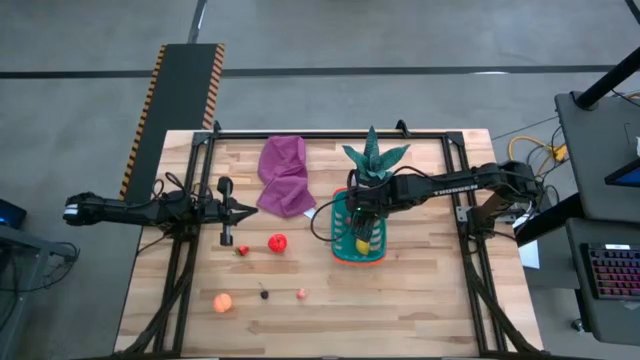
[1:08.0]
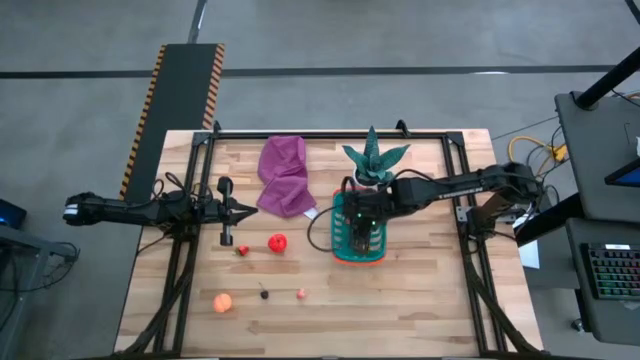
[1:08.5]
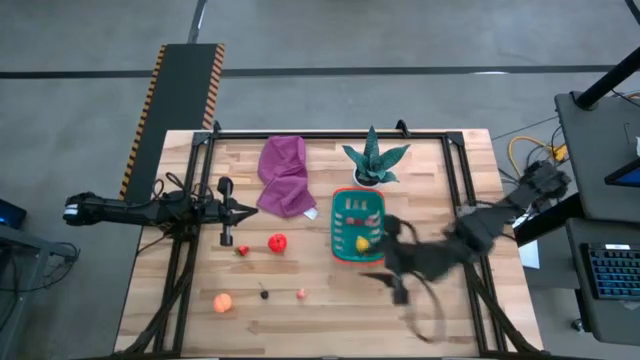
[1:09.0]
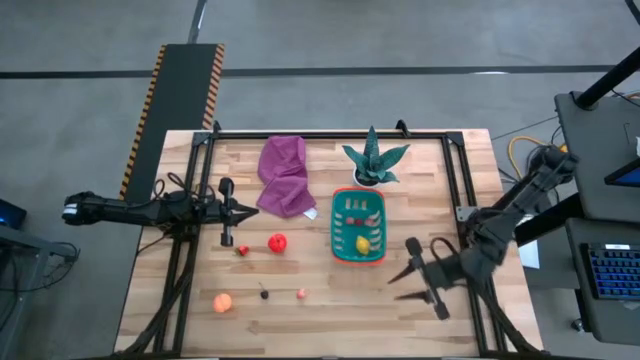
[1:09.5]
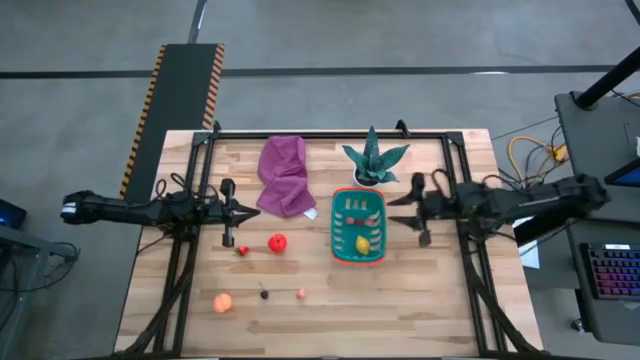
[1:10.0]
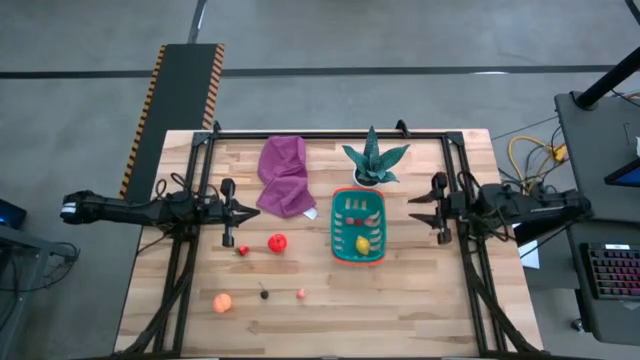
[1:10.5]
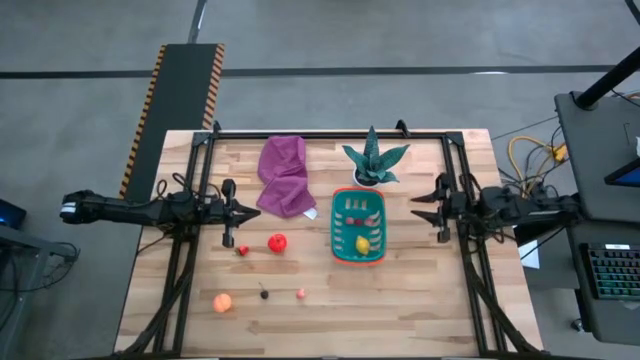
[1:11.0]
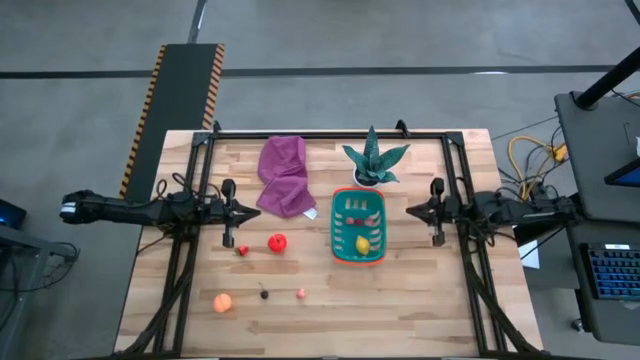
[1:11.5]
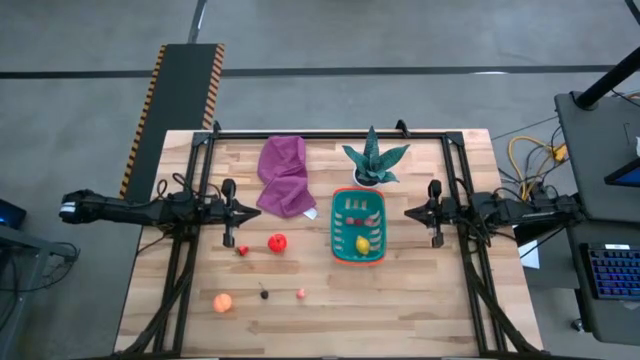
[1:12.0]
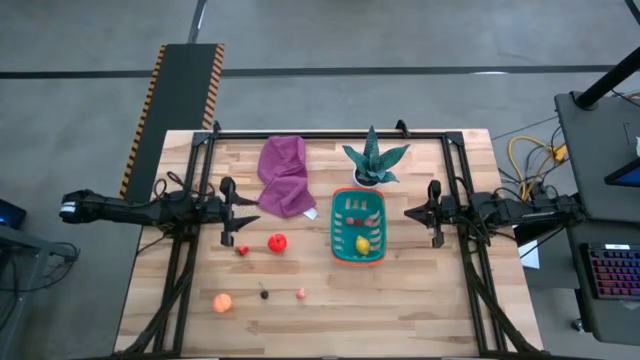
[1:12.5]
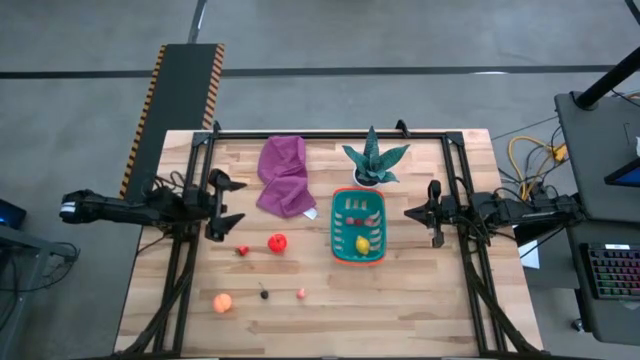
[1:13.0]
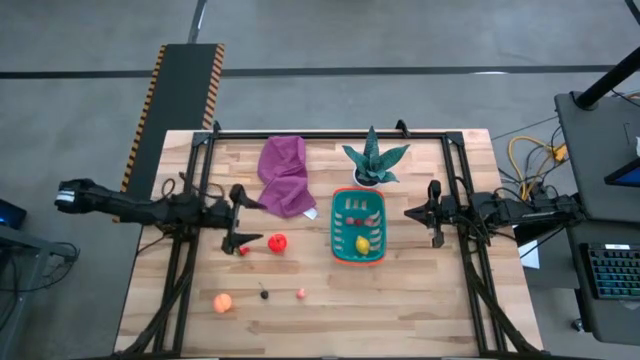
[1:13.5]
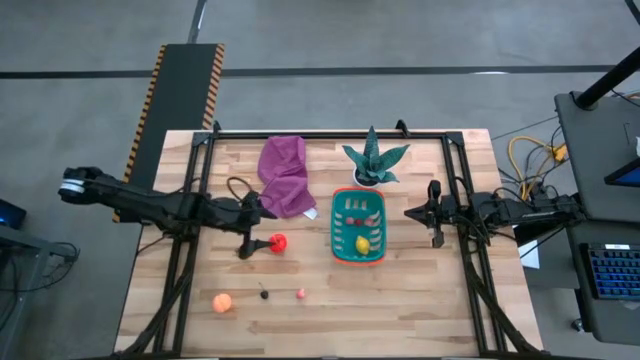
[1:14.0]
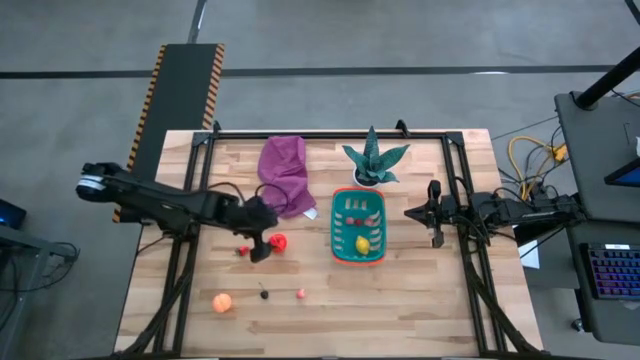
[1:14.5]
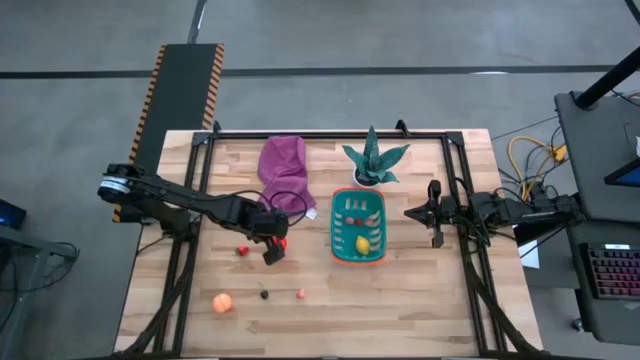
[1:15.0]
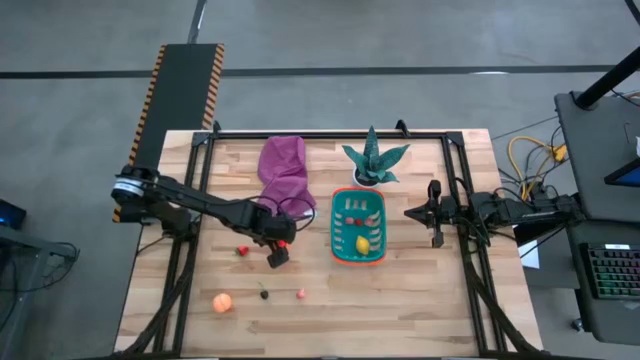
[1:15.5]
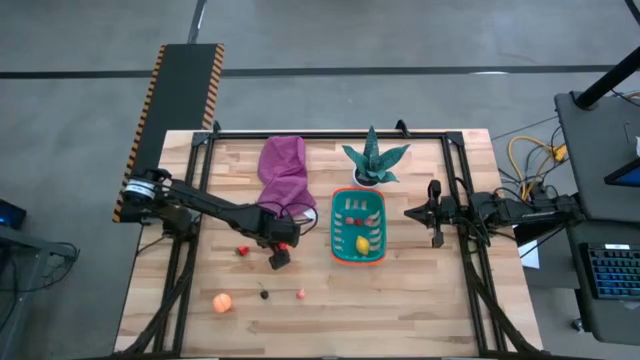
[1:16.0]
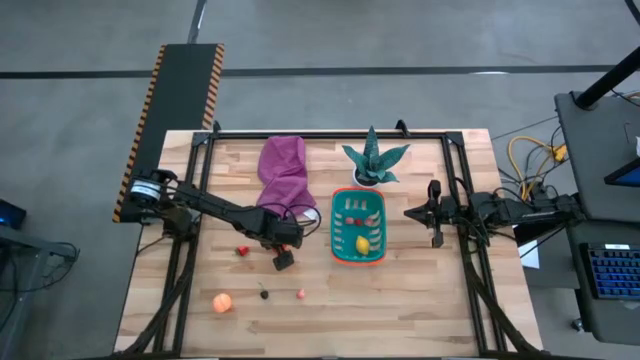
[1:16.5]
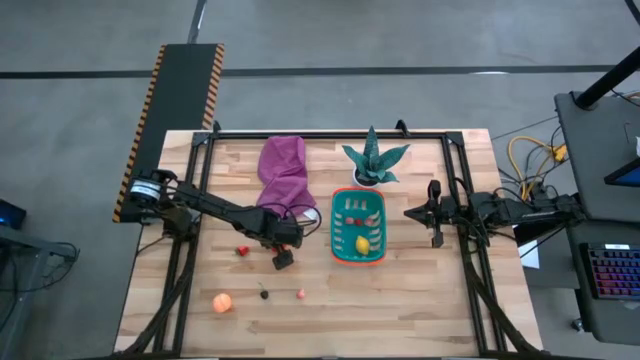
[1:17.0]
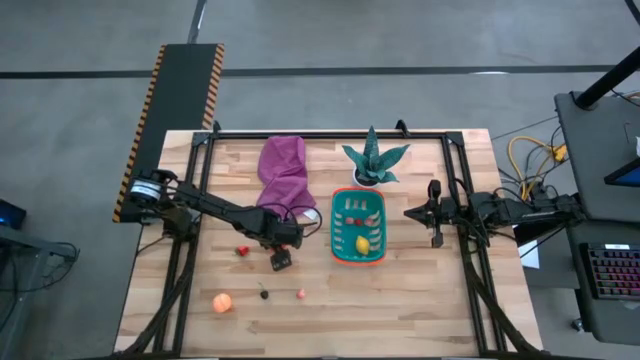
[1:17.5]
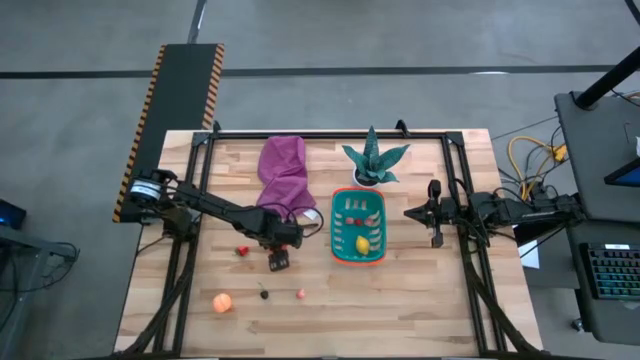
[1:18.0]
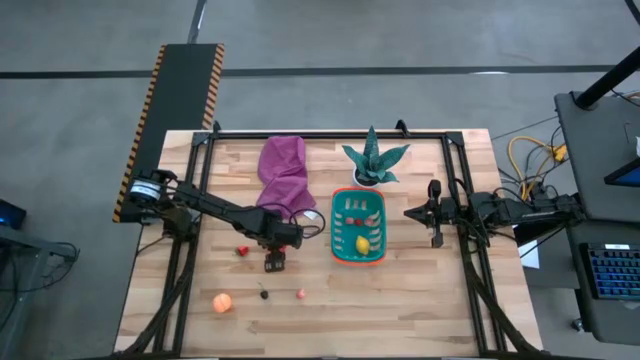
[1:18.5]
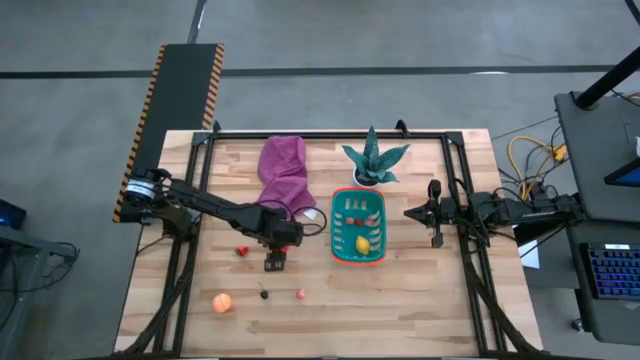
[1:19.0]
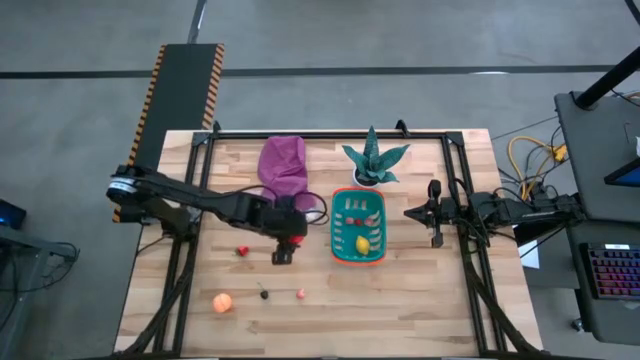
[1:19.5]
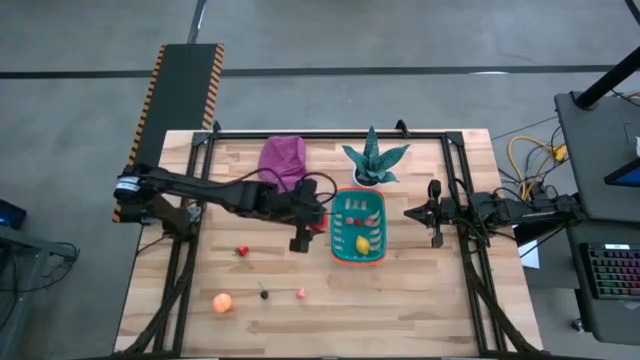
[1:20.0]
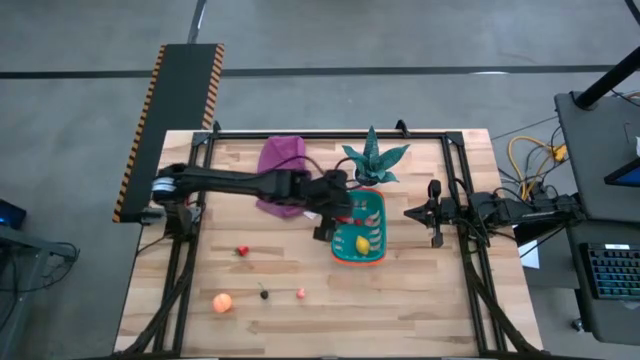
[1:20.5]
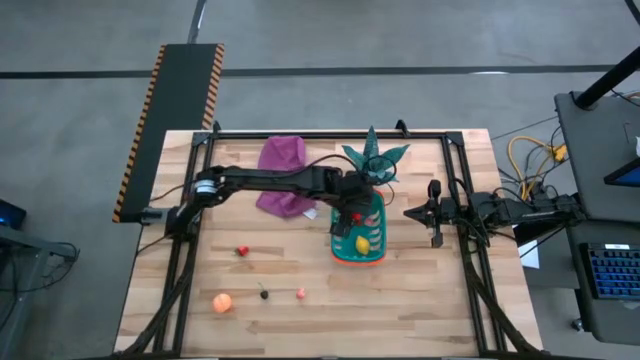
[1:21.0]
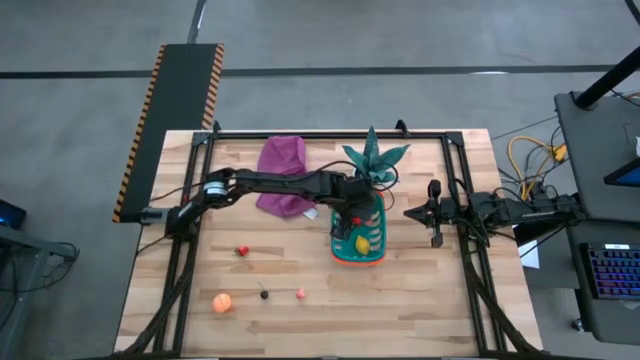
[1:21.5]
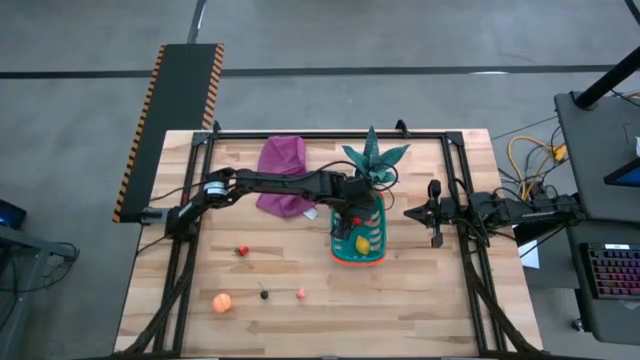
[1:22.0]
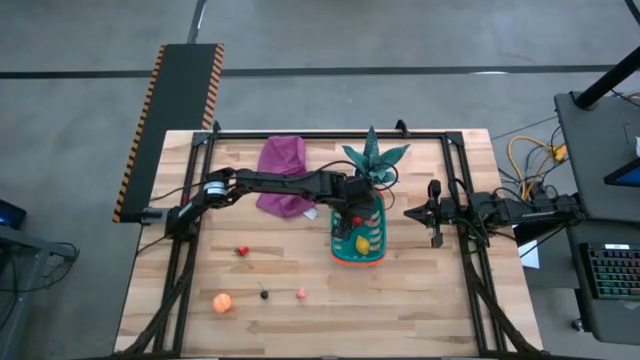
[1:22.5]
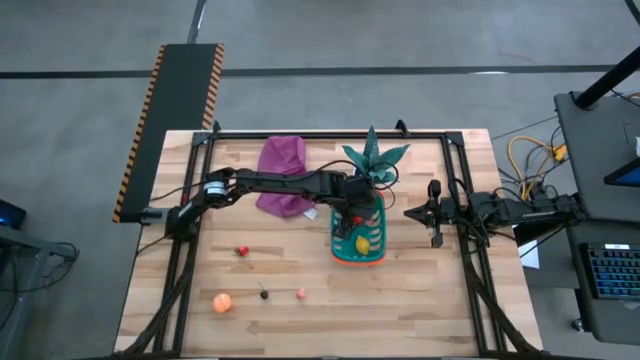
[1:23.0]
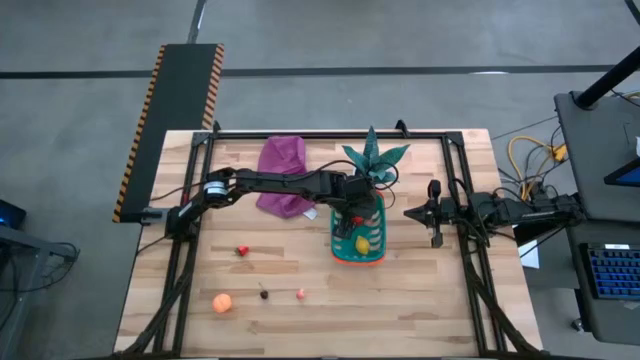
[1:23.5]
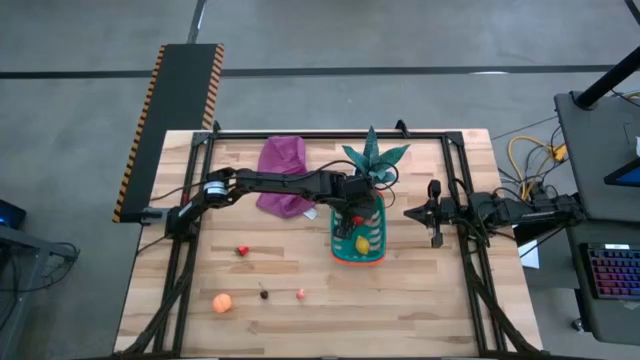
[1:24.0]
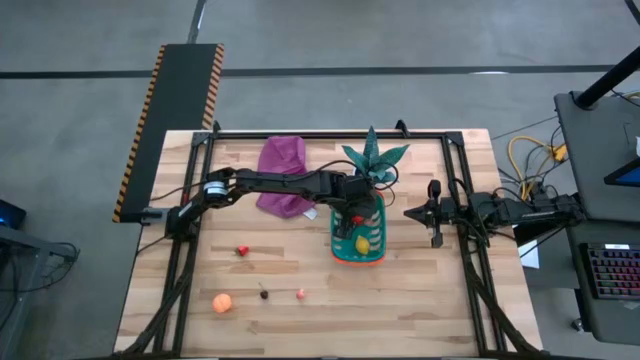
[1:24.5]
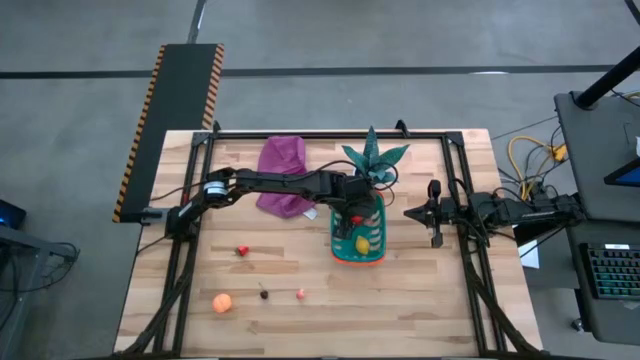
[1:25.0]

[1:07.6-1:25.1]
Task: Pick and placing Produce into tupperware
Put the red apple into the blue basket
